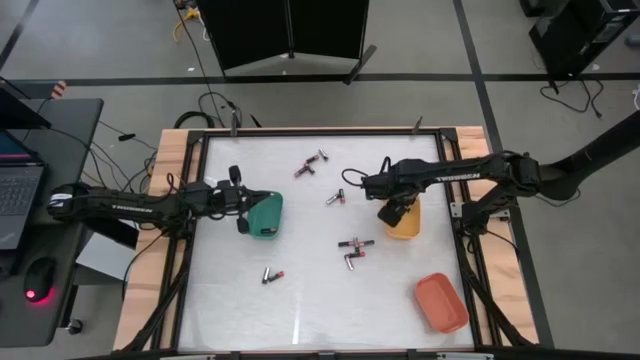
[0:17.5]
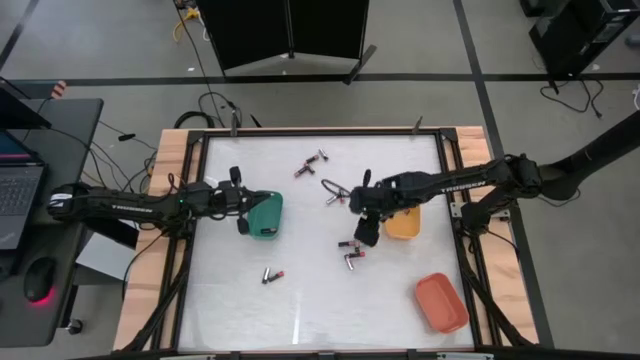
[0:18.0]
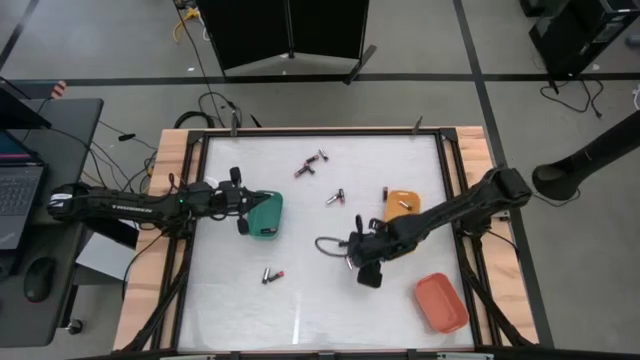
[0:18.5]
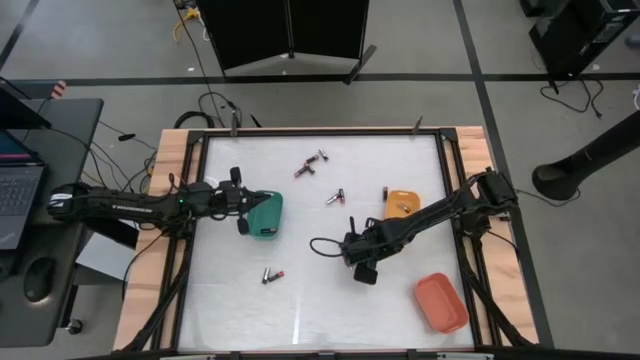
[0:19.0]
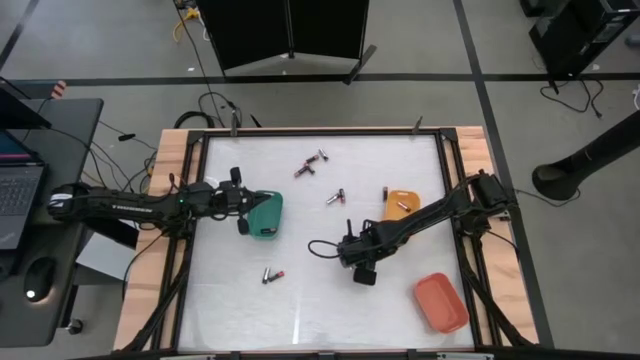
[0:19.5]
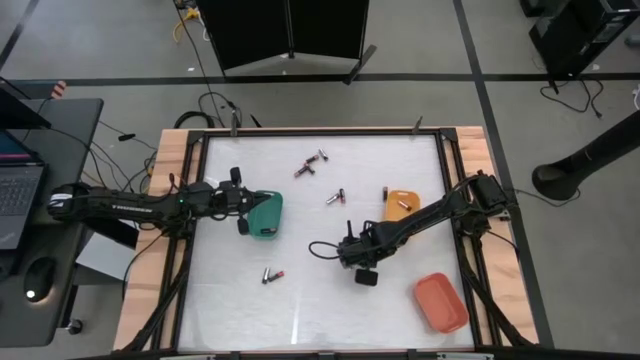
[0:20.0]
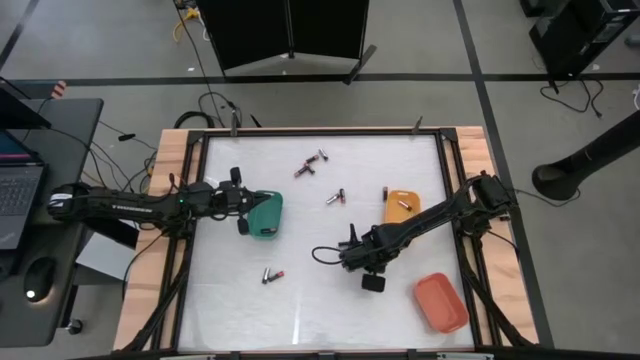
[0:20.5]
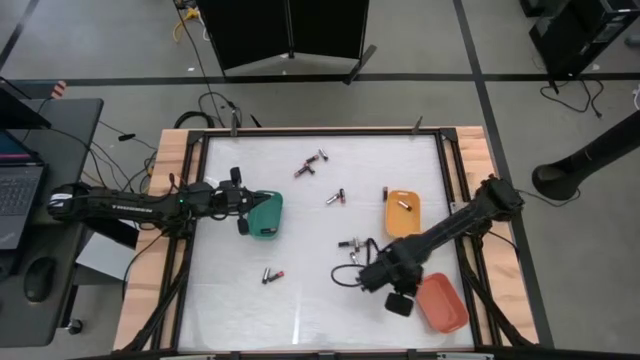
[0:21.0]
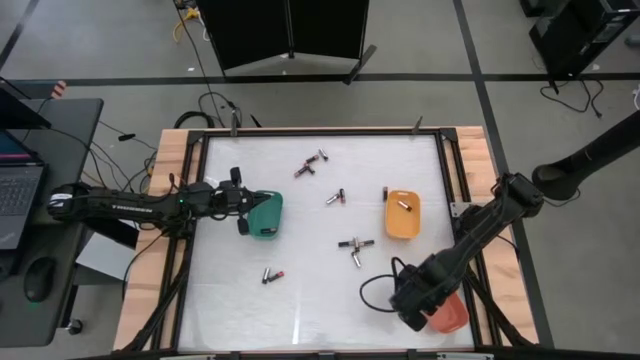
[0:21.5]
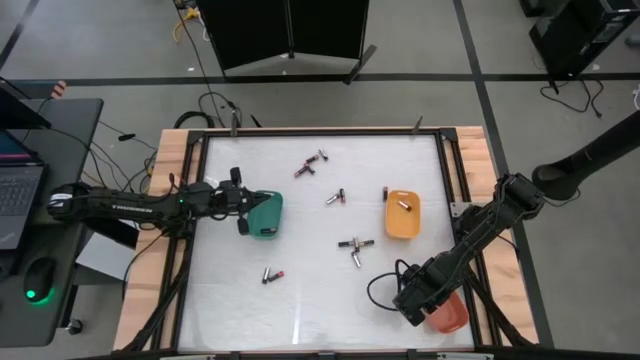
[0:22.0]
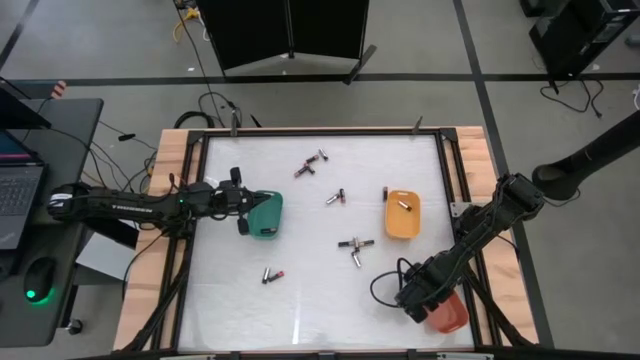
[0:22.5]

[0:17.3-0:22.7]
Task: Sort batteries
Put the black and red battery into the orange bin

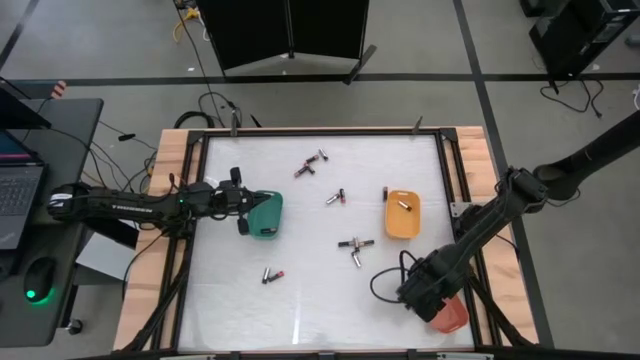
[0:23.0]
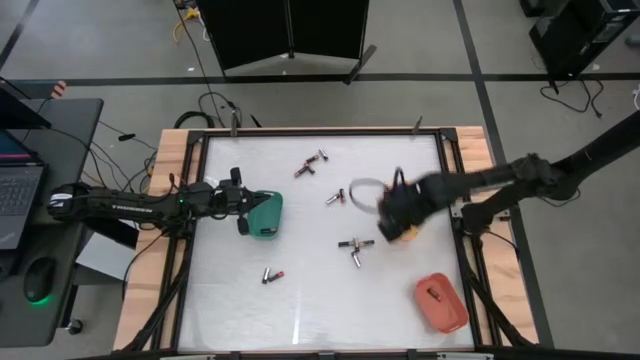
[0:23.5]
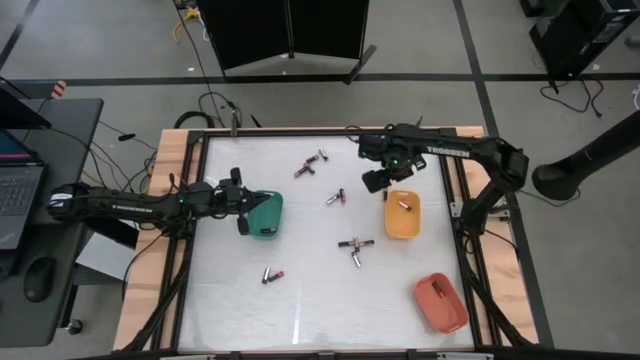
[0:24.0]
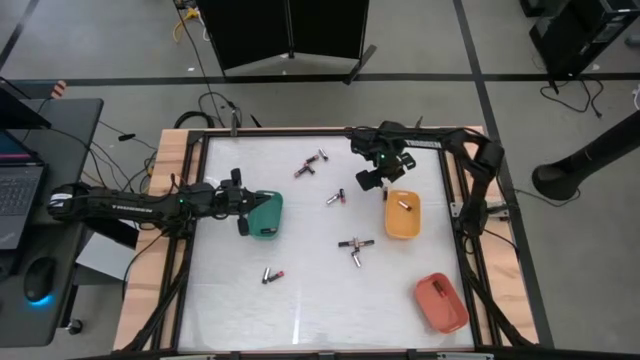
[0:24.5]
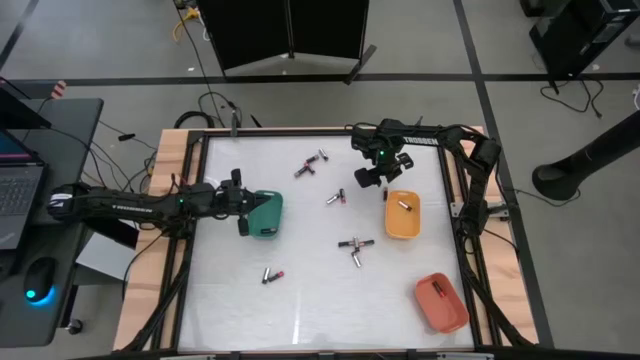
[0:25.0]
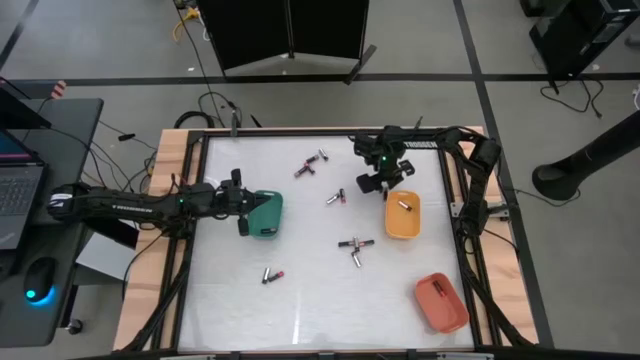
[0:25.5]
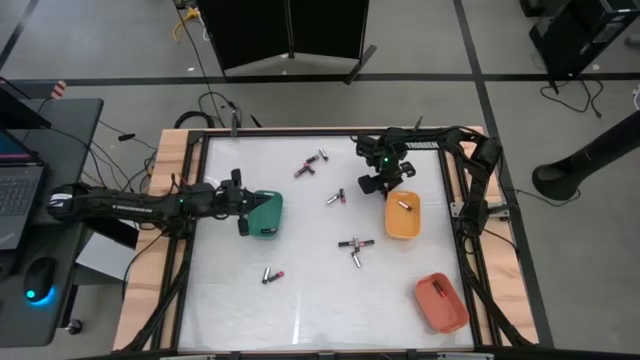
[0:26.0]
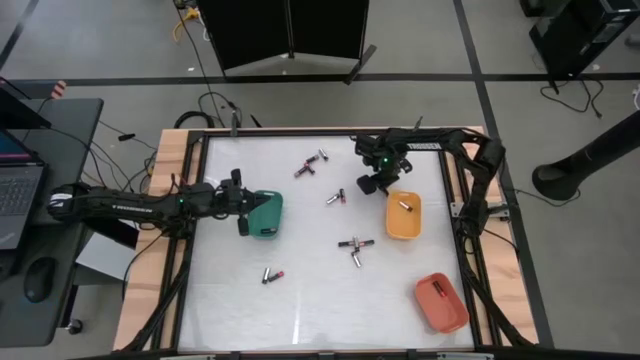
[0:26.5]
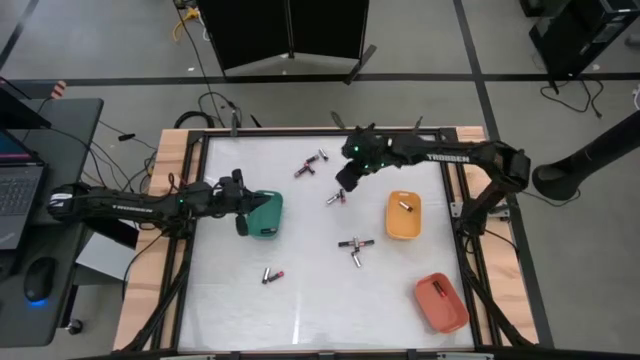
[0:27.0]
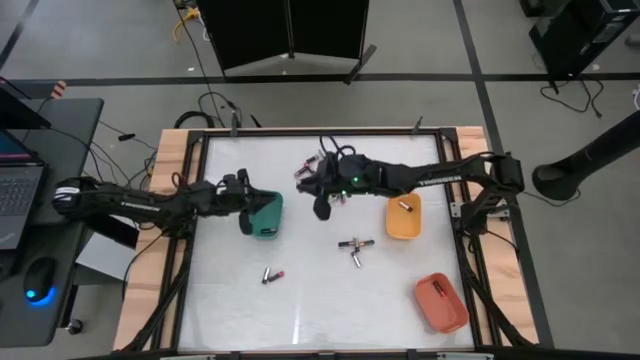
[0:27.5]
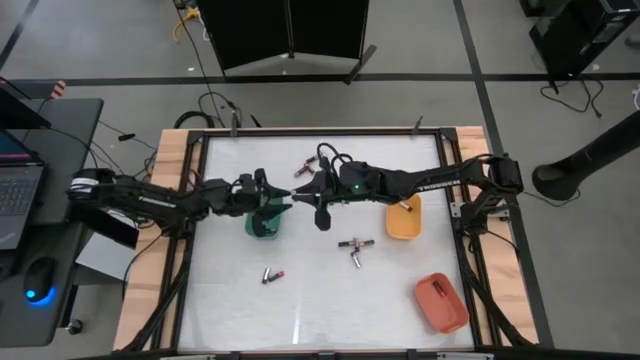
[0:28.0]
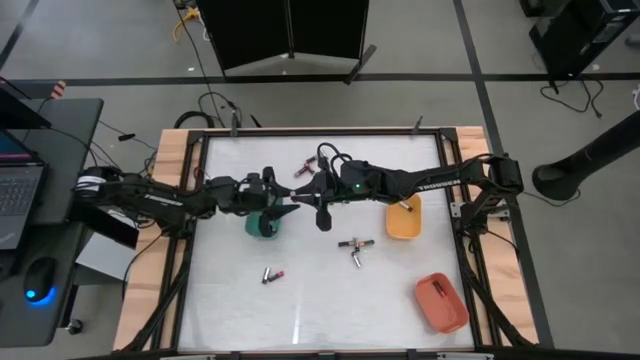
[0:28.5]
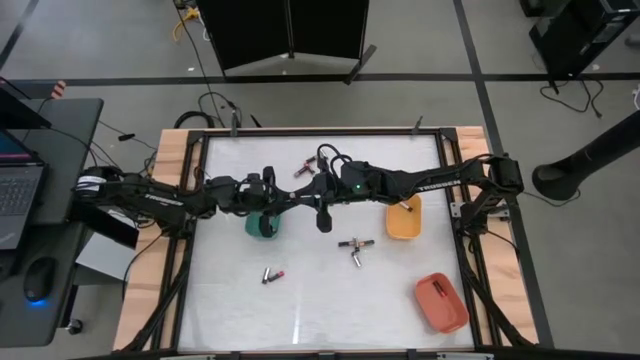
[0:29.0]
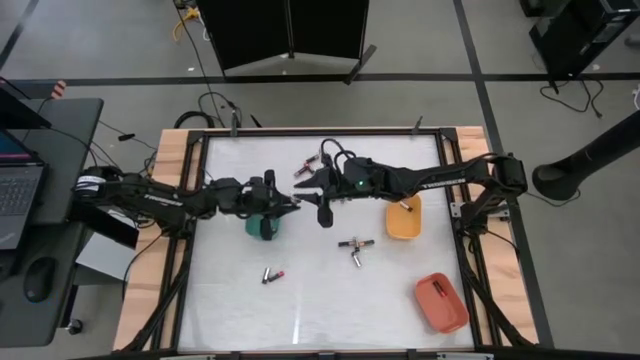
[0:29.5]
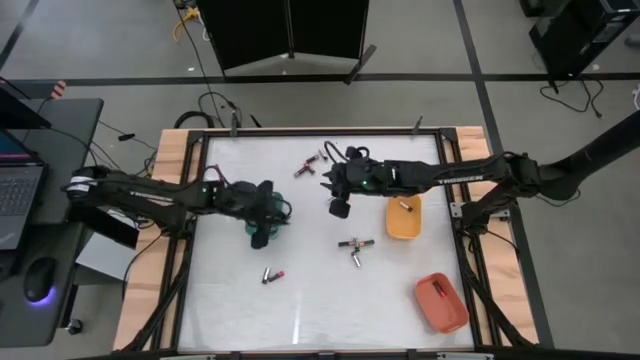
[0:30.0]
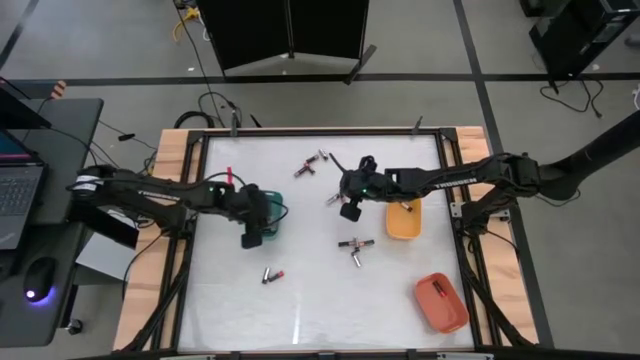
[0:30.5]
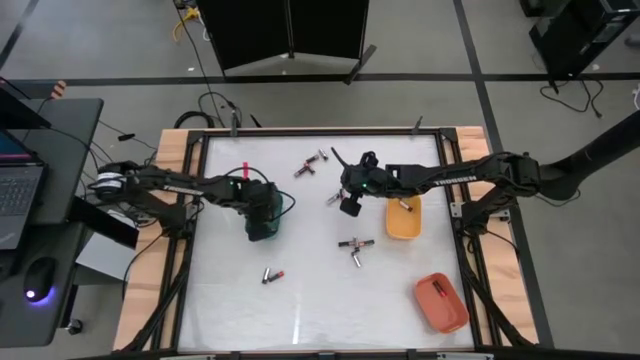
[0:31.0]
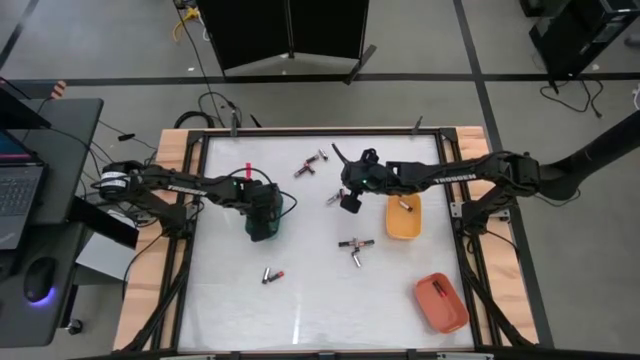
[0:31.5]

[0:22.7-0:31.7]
Put the black and copper battery into the green bin

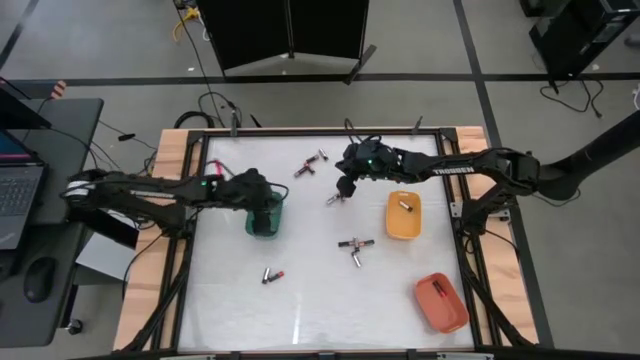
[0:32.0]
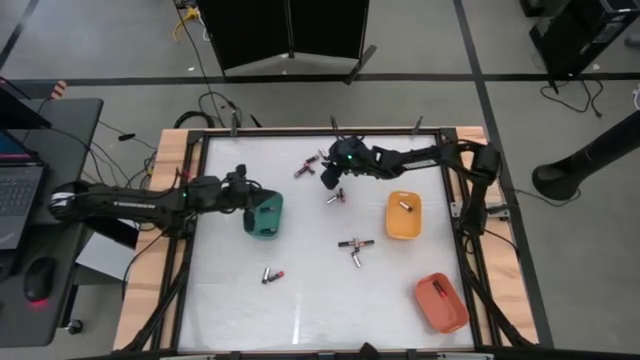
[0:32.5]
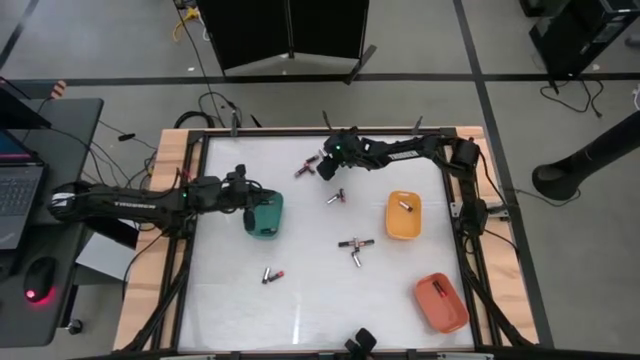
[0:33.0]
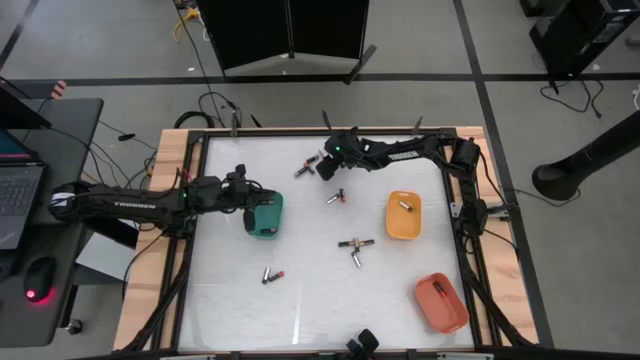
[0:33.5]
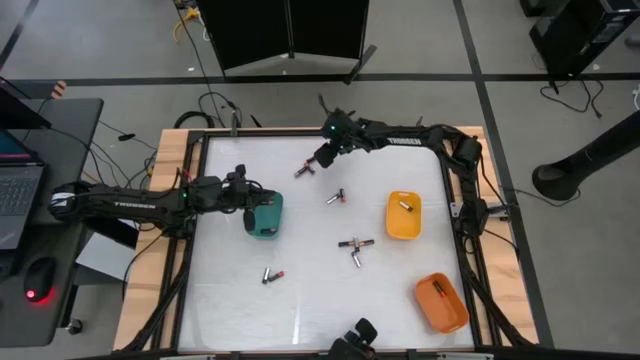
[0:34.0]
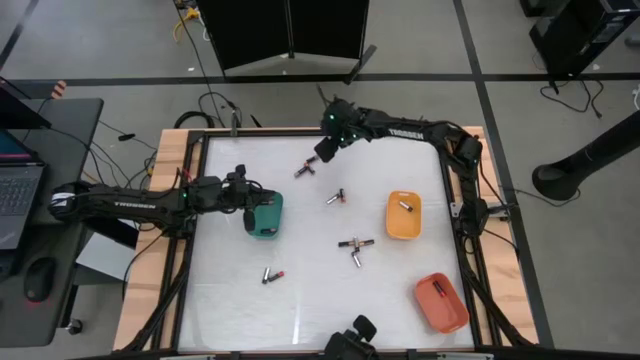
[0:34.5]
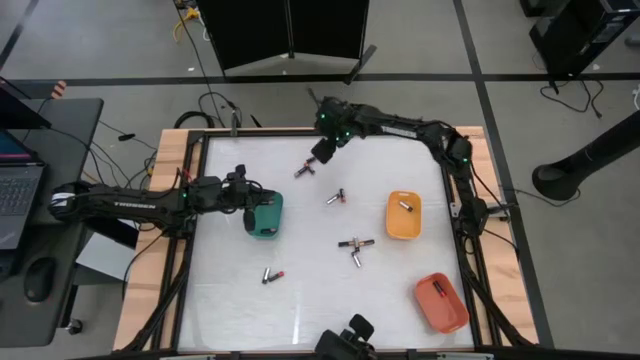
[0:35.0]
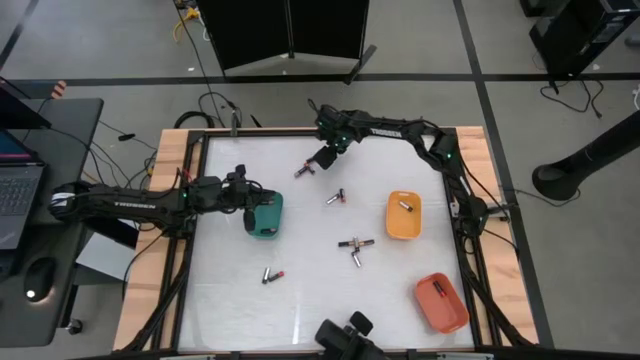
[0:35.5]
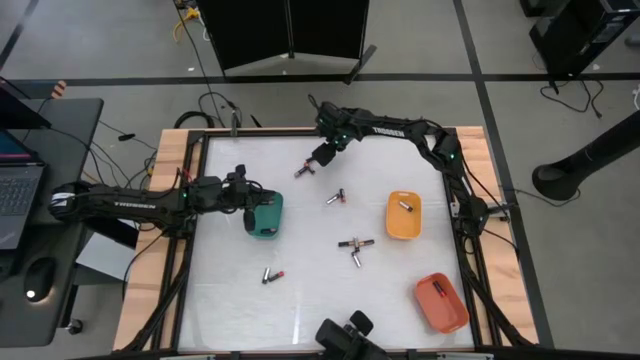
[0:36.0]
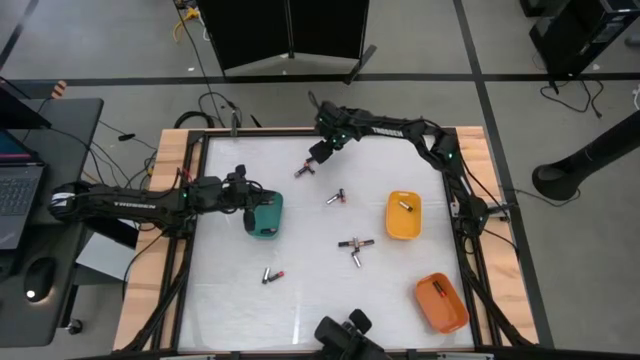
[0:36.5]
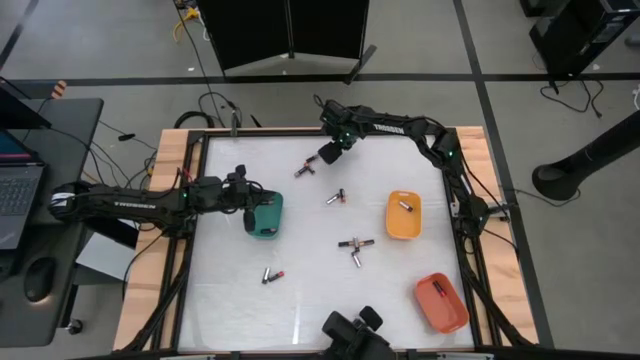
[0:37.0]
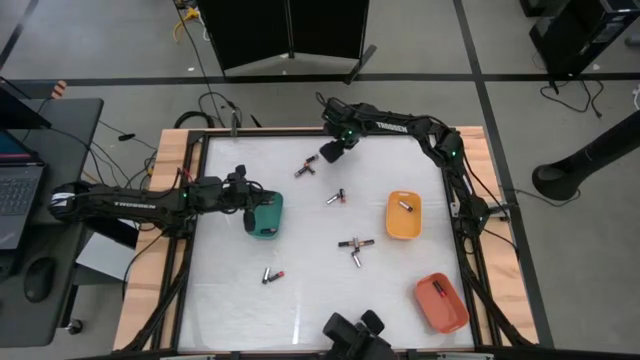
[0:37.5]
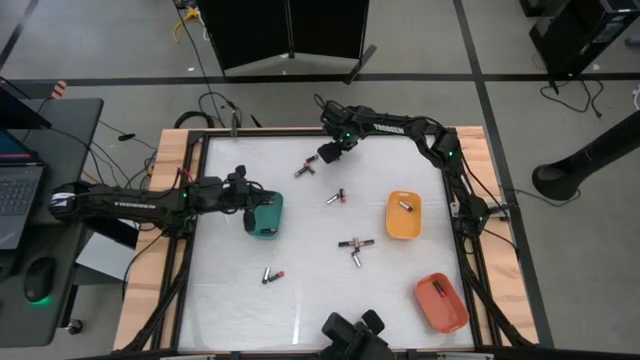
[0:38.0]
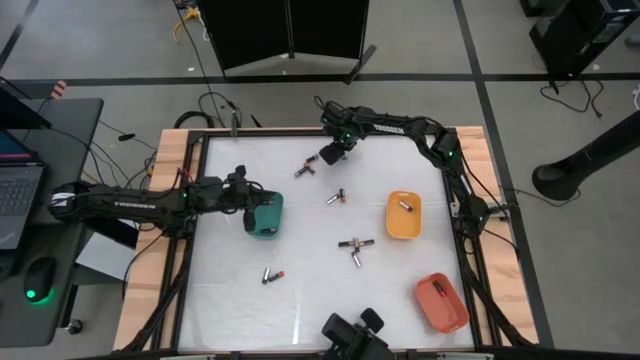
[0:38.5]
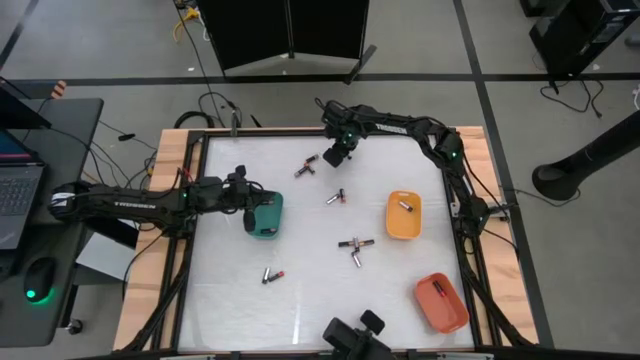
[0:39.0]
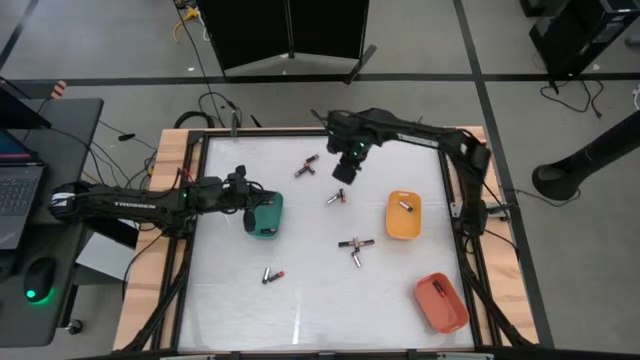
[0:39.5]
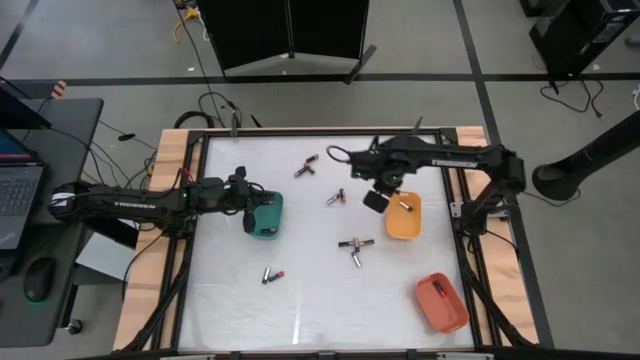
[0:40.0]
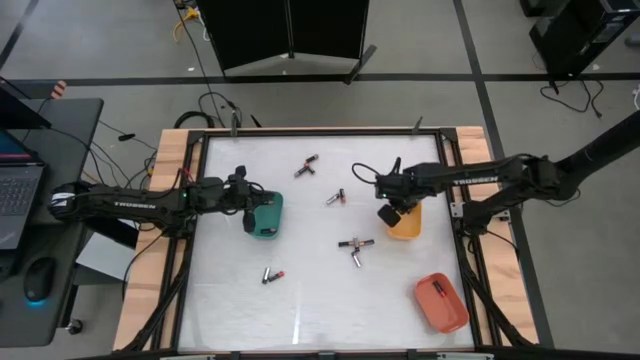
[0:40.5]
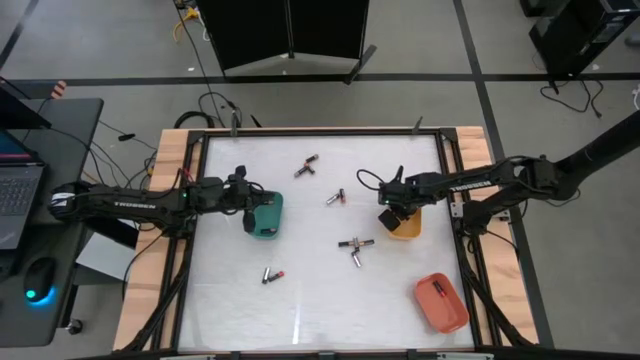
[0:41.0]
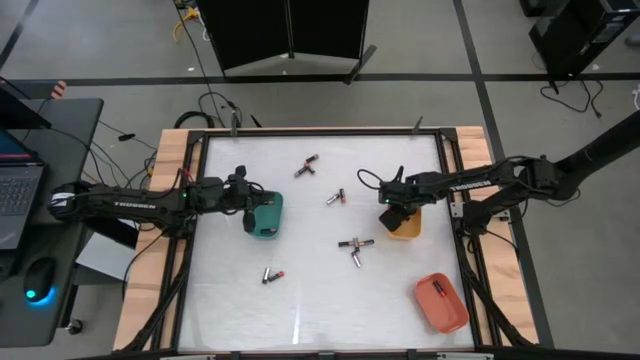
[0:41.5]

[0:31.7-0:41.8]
Put the silver battery into the yellow bin
